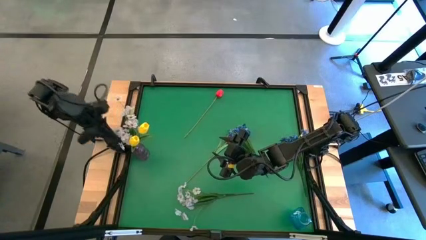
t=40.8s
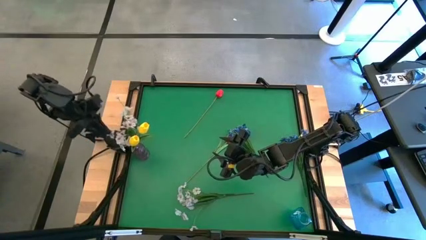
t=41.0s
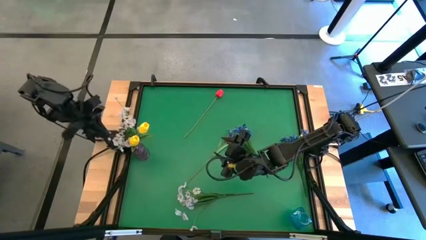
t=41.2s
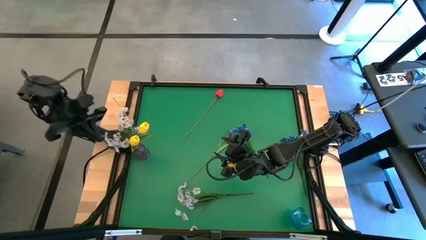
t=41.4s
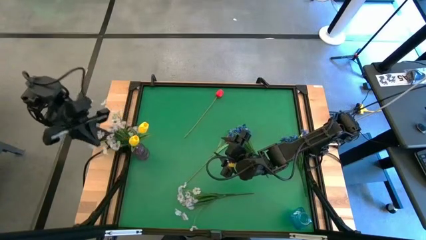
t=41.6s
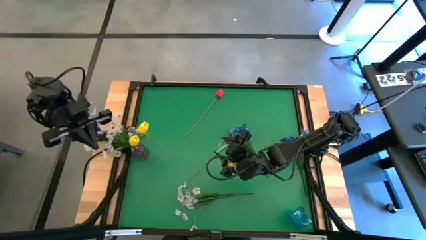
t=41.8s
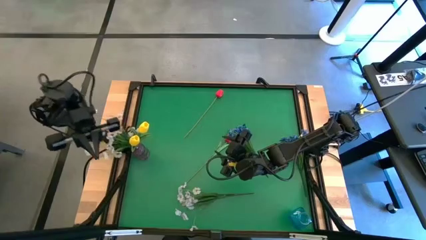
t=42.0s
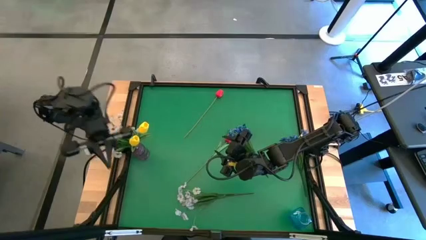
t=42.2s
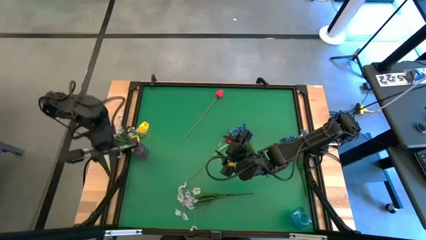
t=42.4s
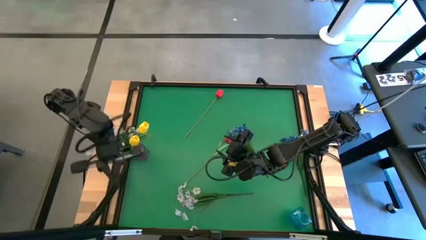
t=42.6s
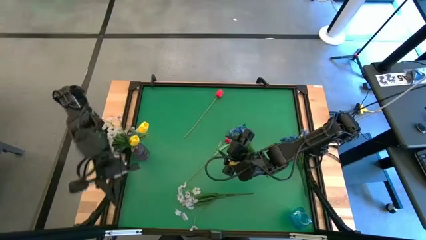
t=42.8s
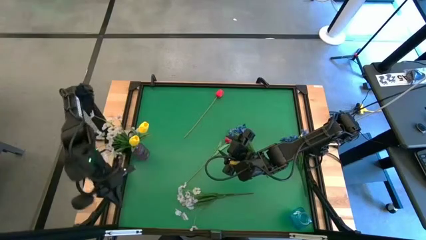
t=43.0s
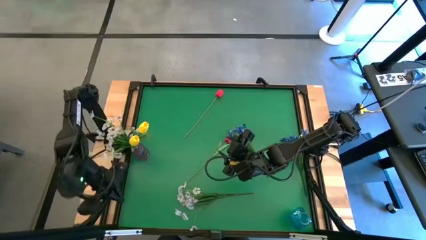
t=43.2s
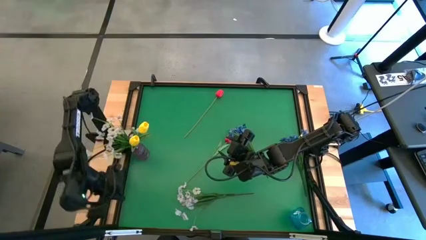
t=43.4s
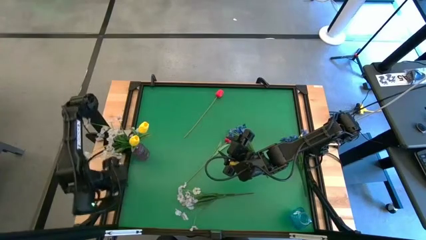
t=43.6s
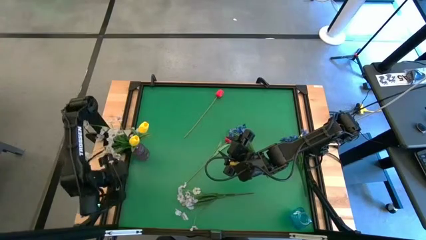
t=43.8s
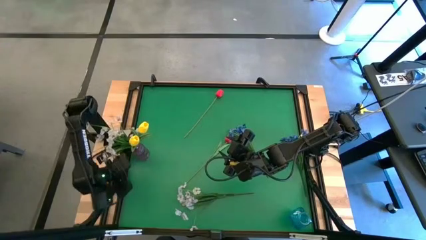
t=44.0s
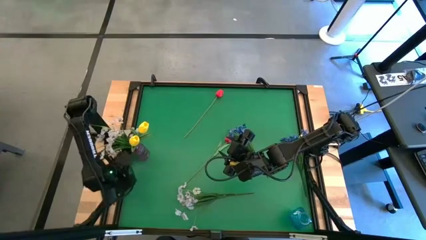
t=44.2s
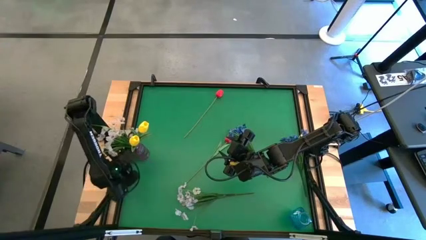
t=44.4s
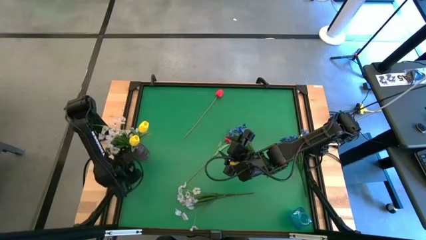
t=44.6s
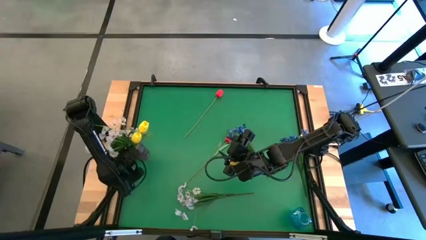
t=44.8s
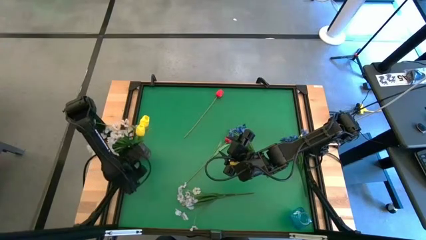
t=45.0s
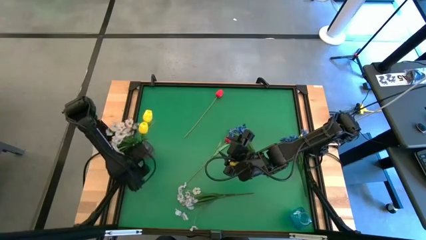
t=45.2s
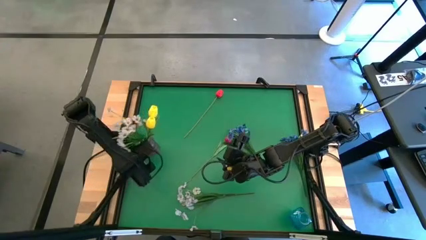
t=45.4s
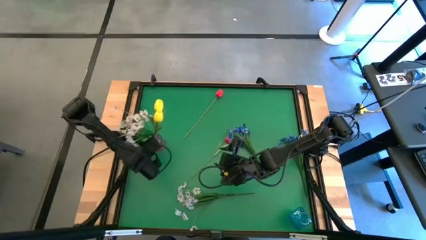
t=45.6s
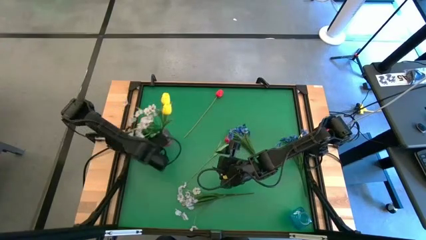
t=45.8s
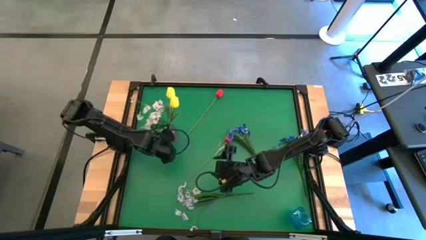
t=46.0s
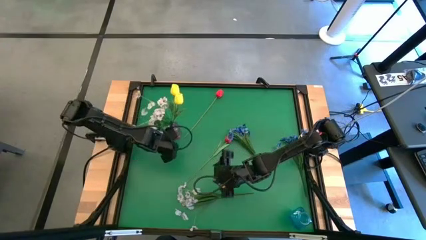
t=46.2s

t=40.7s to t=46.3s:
Task: Sort flowers into vase by color
Move the purple vase to the top left of the table

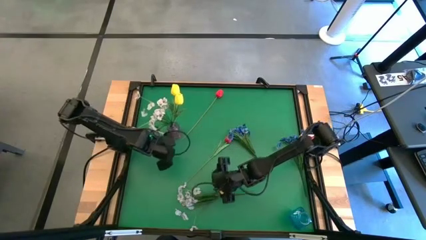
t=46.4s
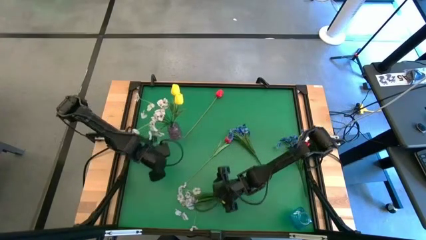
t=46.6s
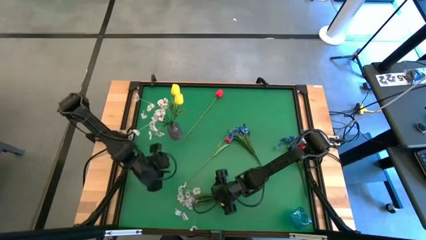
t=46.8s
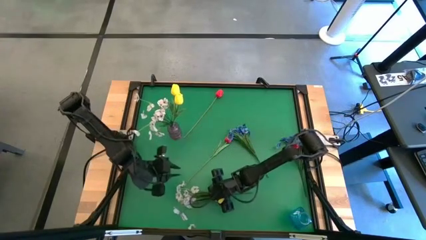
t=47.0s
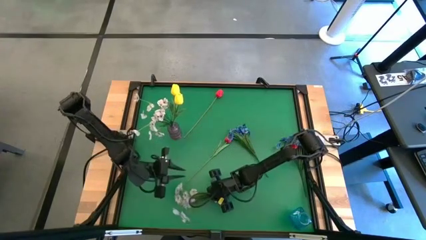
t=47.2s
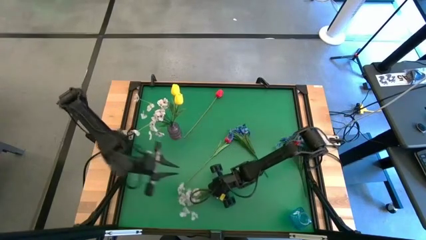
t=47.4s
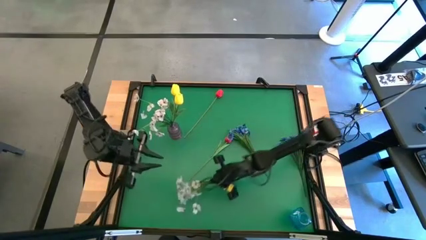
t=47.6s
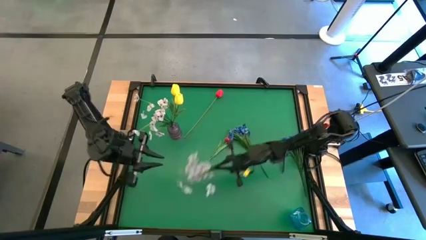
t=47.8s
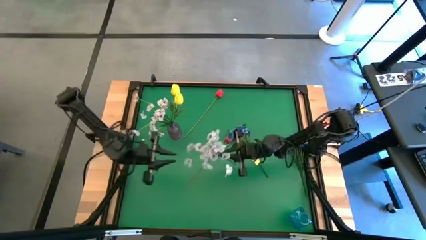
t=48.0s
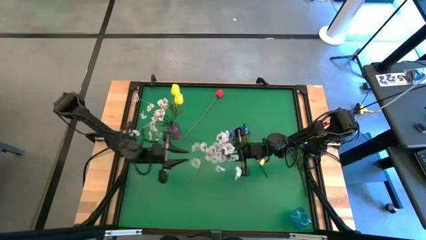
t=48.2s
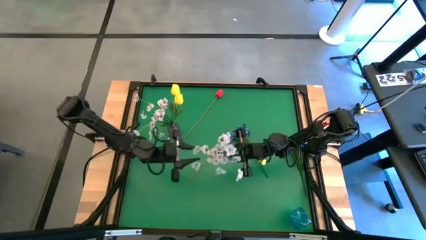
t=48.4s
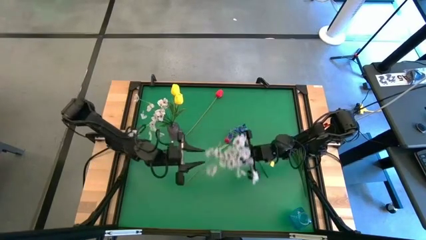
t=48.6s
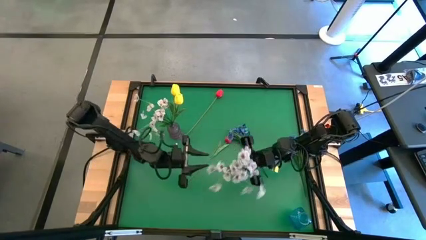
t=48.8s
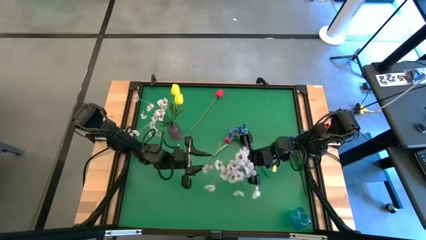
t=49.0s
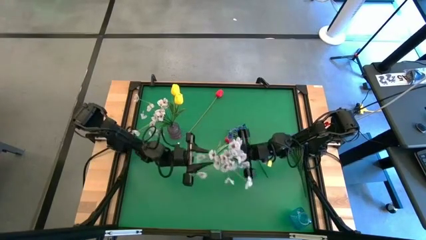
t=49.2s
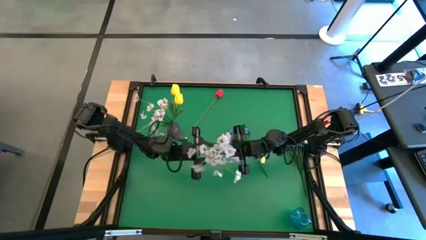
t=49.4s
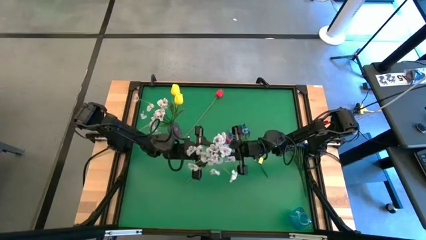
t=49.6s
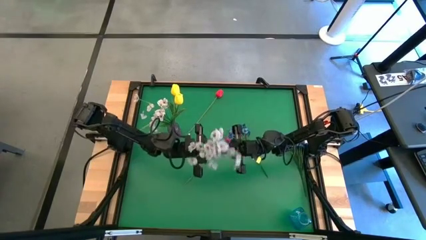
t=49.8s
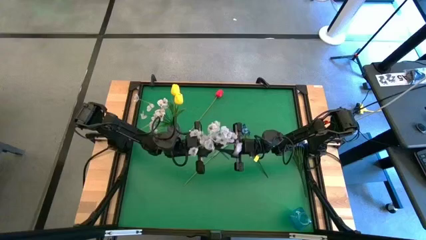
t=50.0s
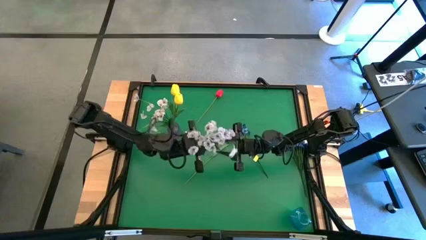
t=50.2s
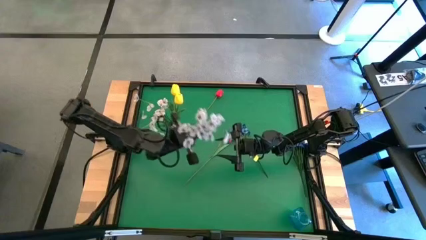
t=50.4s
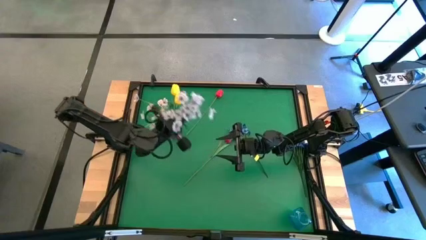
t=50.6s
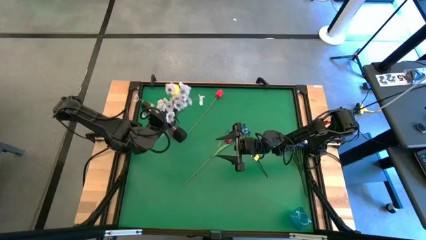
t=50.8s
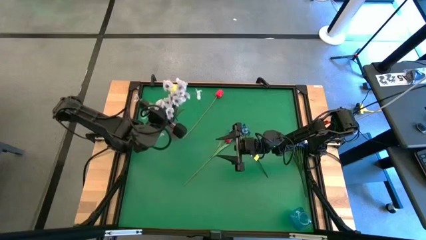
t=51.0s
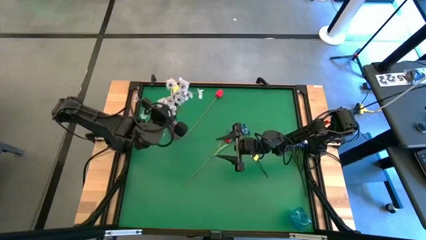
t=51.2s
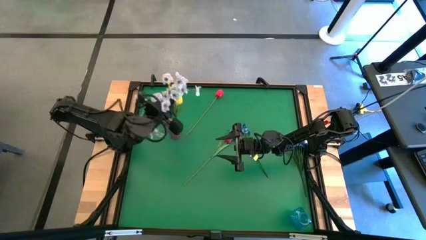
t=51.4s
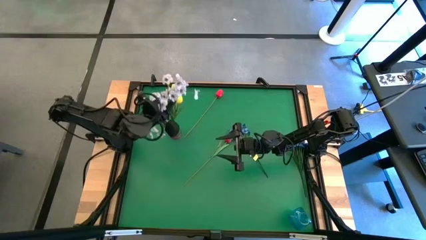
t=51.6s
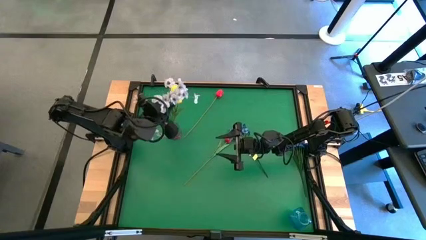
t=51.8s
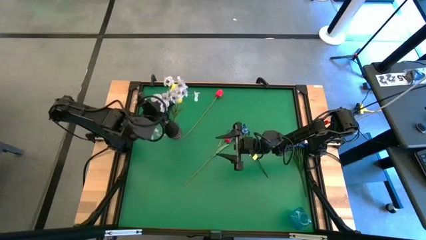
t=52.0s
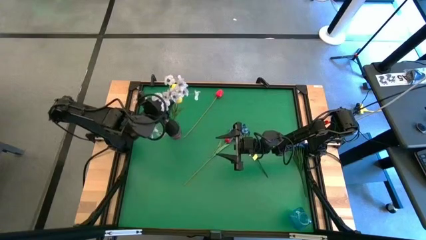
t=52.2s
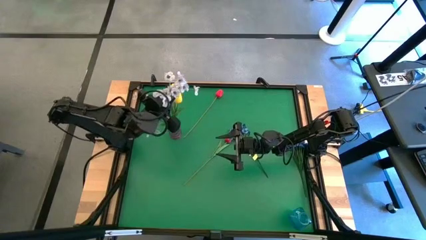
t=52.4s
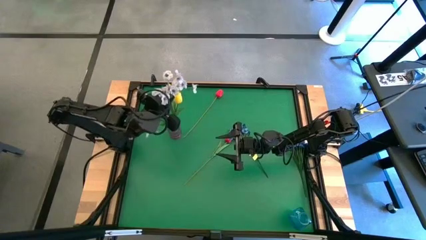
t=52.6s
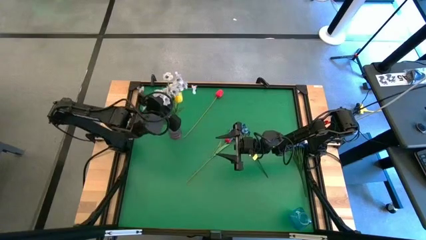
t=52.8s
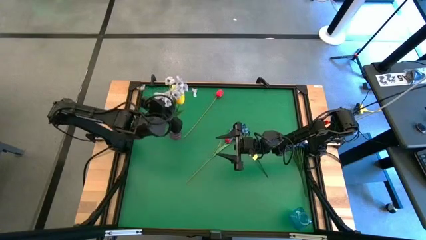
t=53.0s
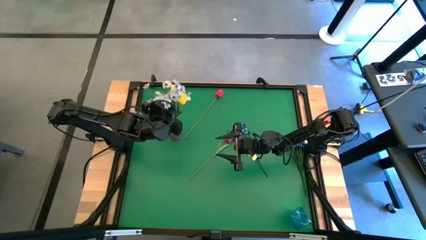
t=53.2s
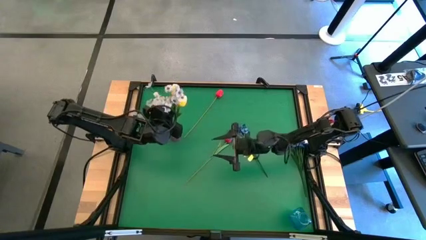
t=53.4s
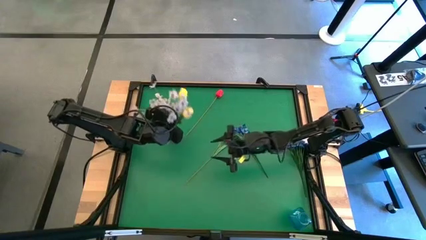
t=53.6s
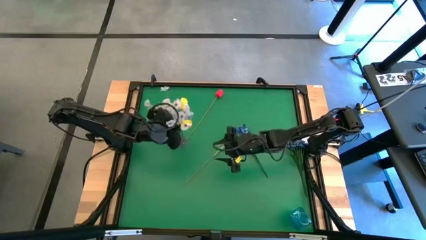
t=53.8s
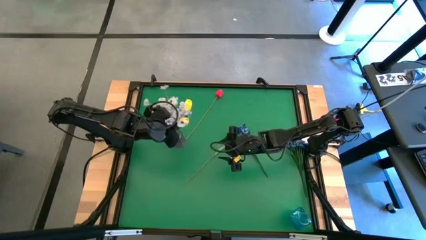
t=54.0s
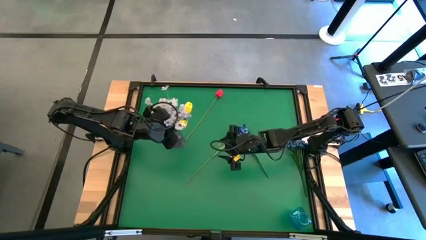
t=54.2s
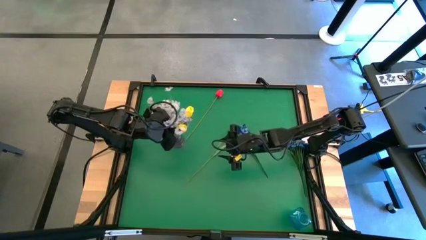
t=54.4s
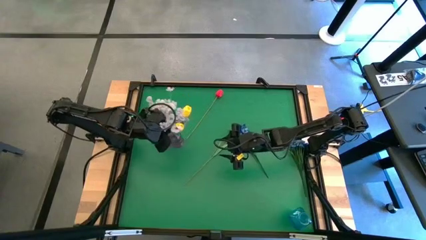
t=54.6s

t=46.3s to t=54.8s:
Put the white flower into the purple vase

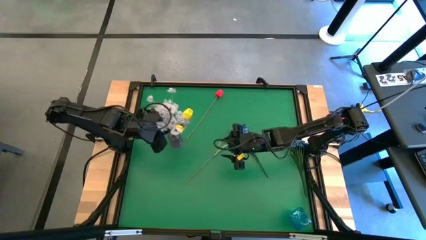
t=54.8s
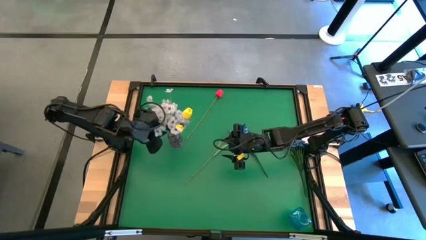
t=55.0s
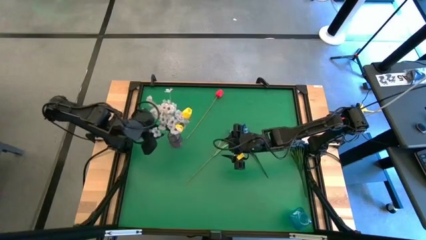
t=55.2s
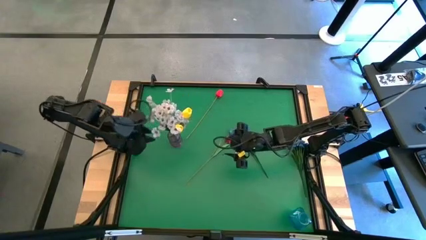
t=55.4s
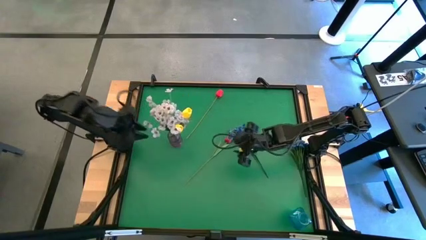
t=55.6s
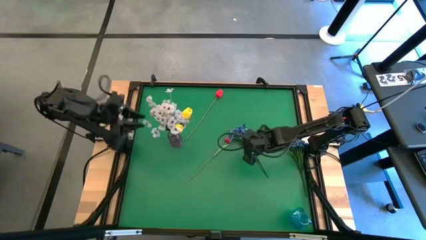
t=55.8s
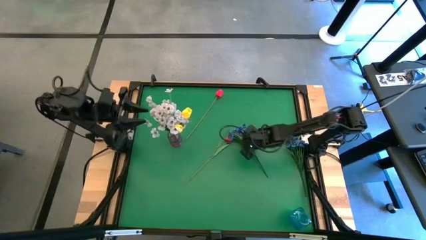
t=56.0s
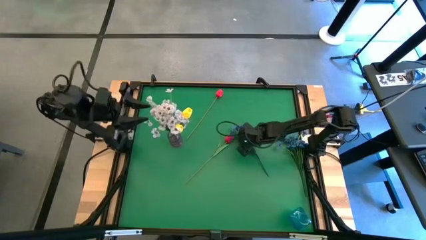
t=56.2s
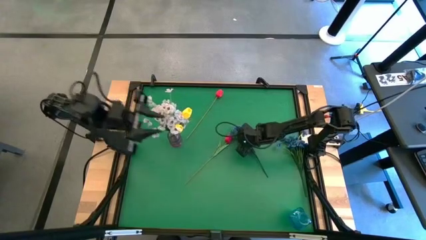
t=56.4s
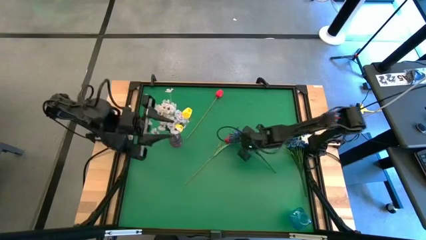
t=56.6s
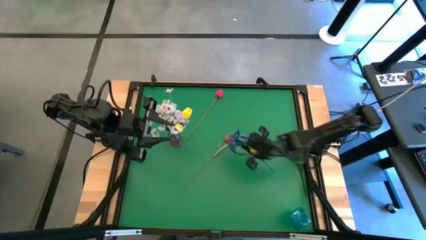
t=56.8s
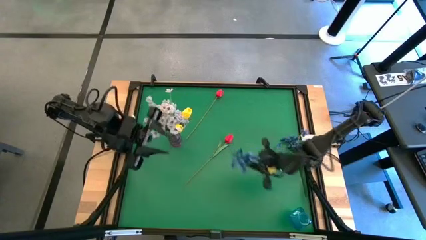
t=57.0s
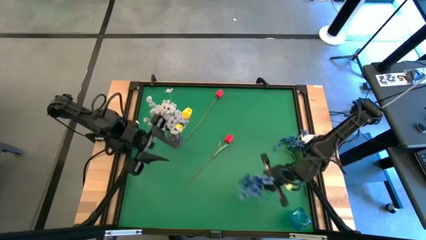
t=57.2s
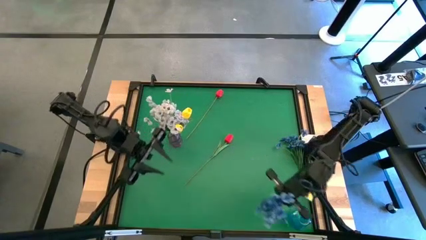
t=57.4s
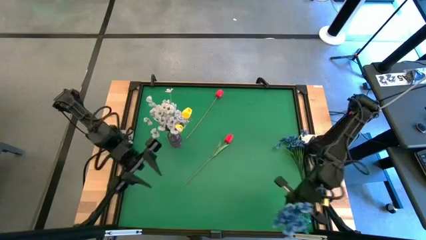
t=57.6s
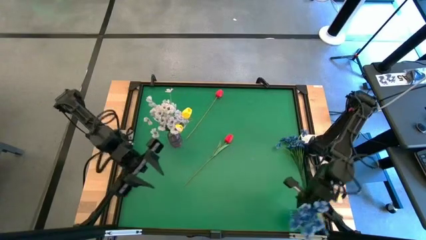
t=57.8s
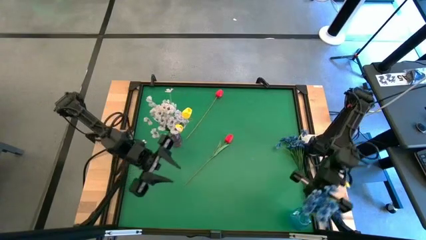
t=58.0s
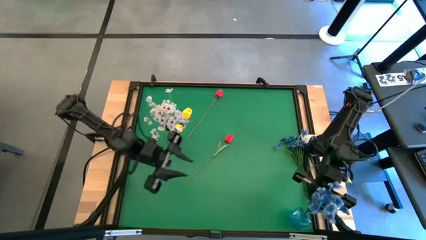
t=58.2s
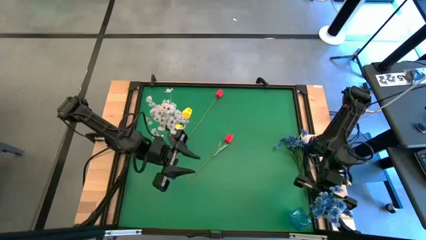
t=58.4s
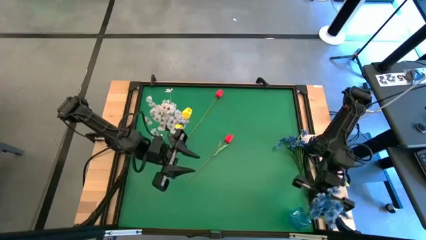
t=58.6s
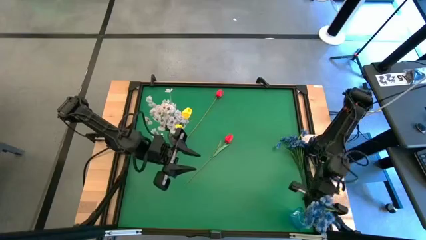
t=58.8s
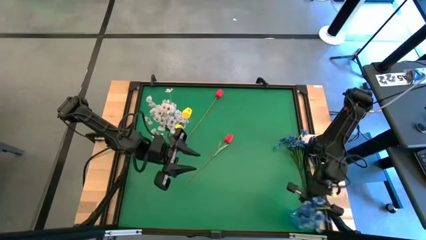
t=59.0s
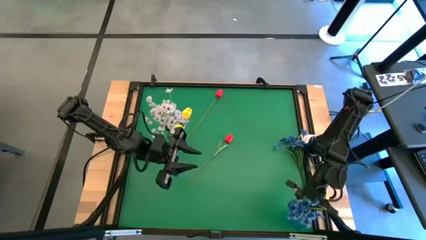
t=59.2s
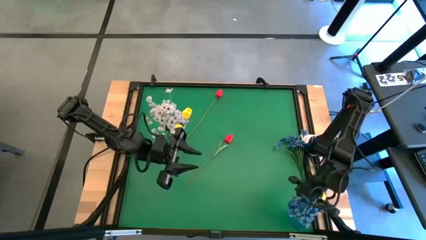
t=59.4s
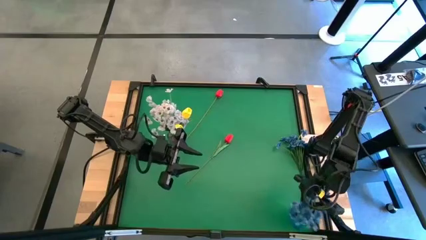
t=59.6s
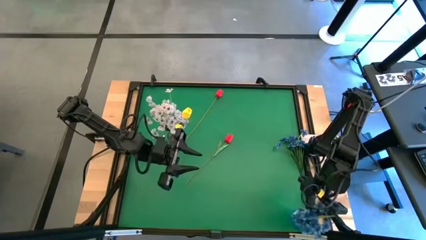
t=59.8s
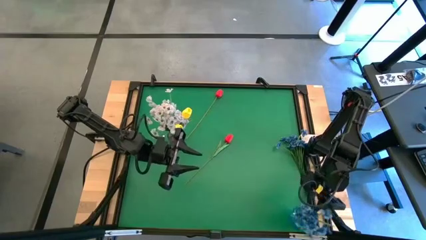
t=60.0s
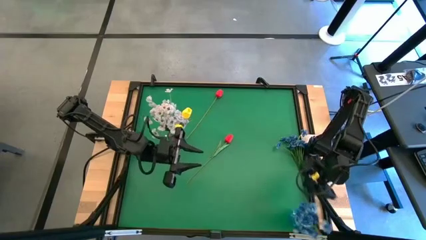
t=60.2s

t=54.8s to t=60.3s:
Put the left blue flower into the blue vase
